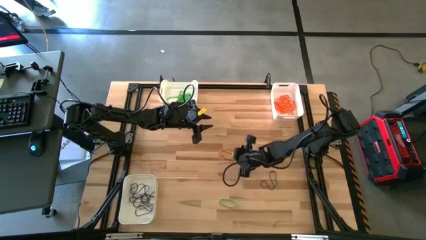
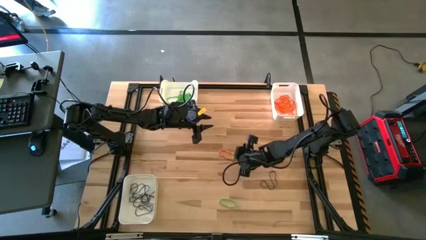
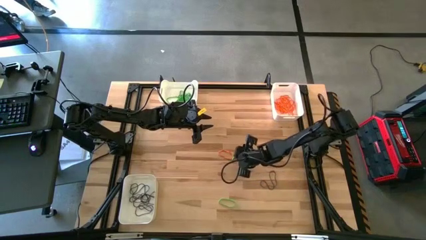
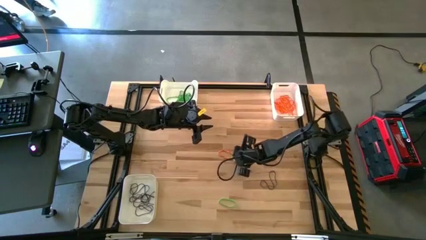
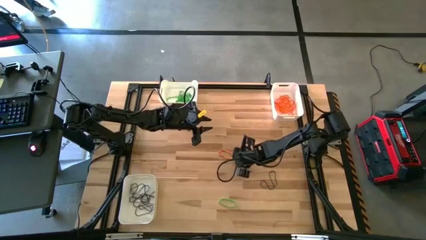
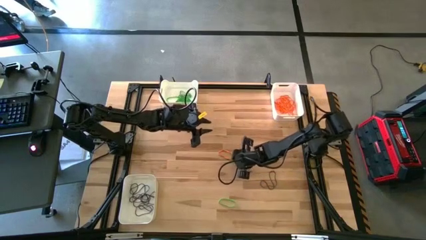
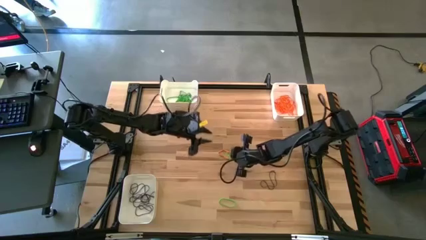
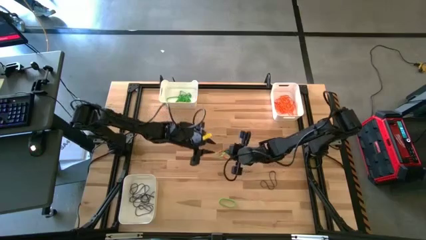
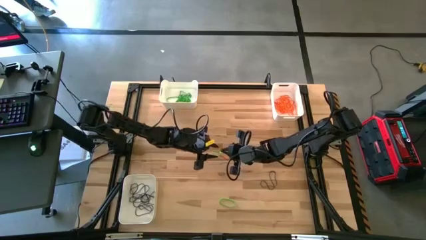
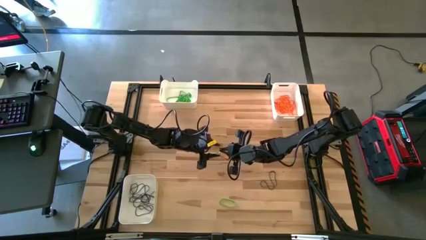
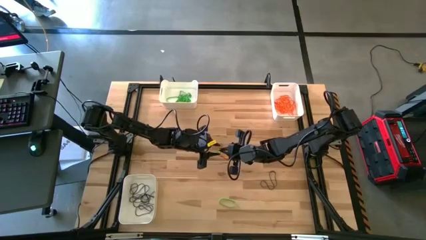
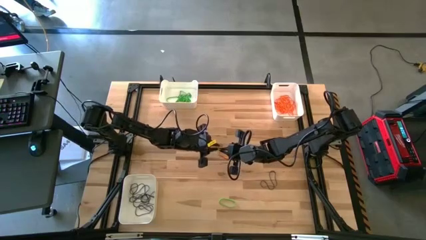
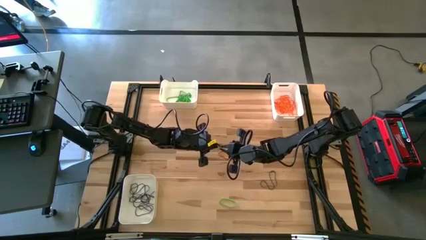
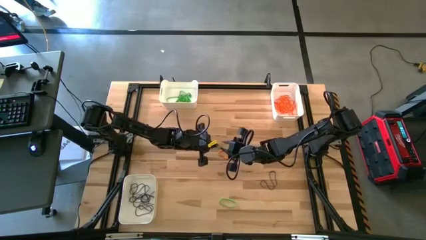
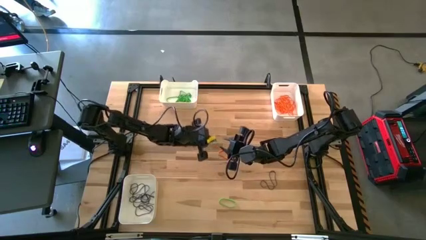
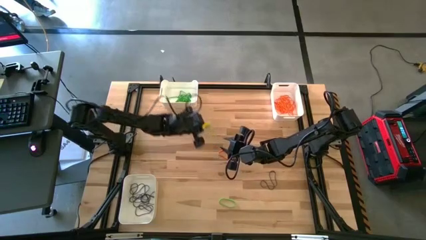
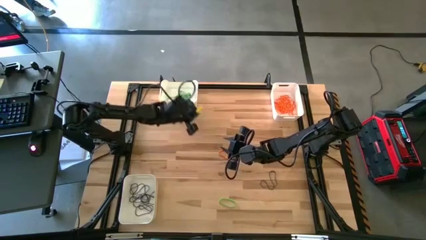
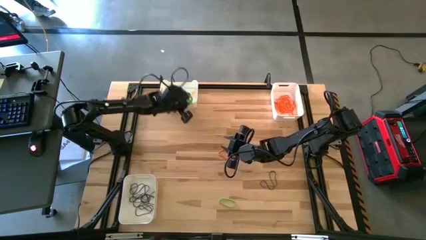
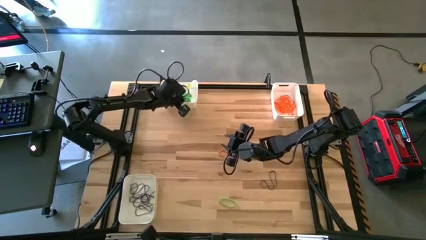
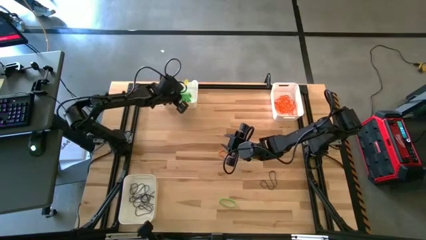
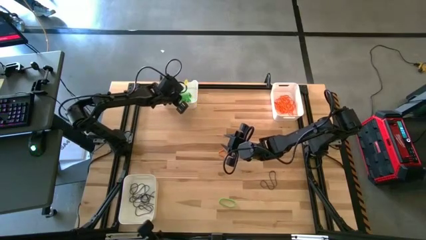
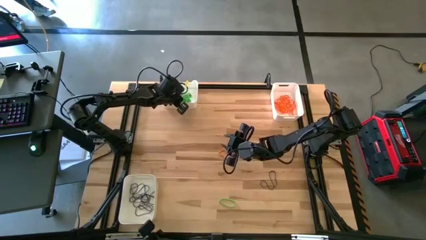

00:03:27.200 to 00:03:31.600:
Task: Sort rubber bands into baskets
Put the green rubber band into the top left white bin

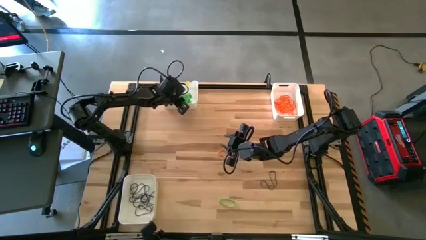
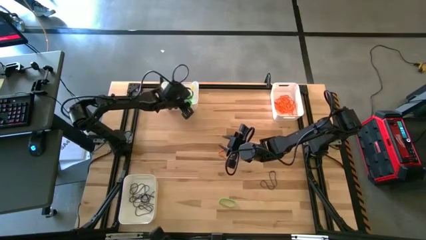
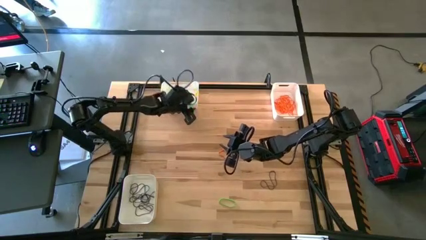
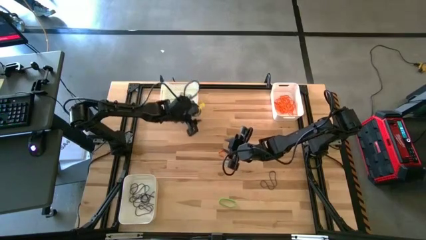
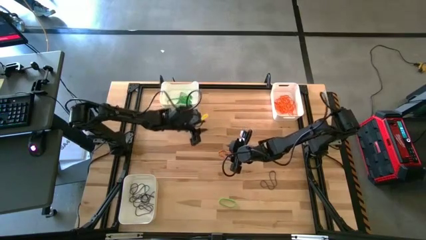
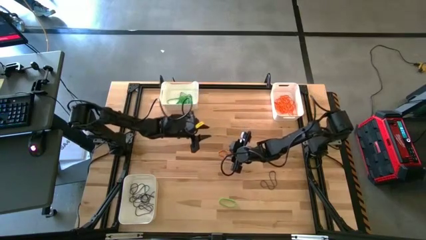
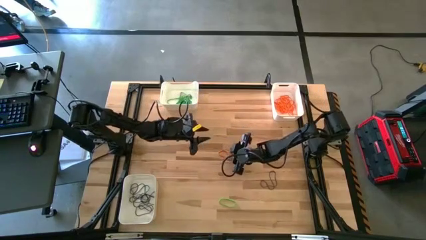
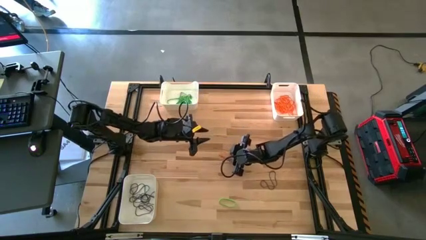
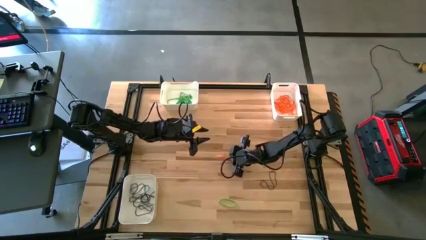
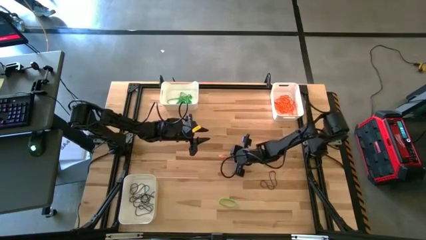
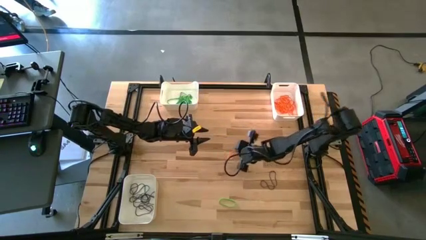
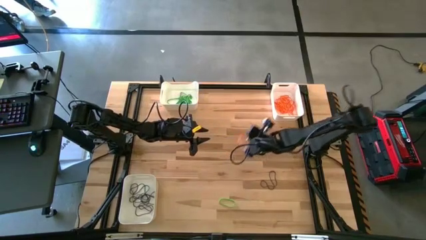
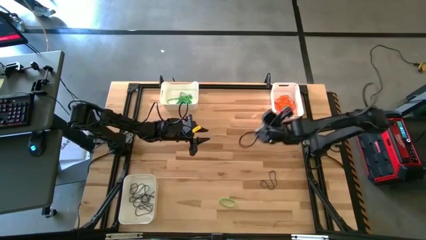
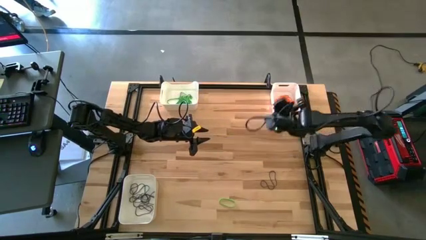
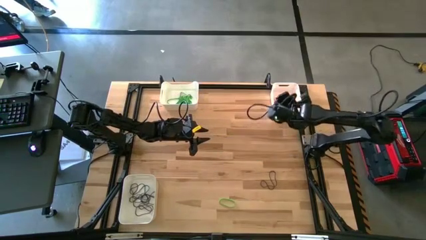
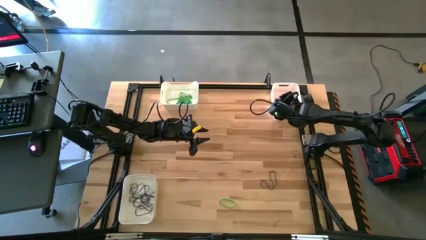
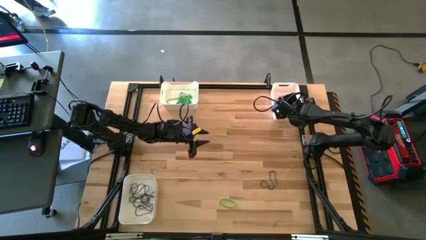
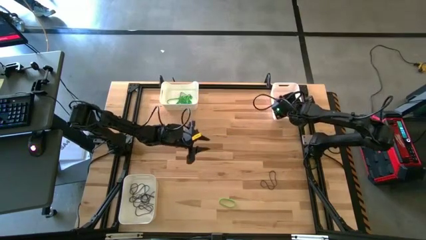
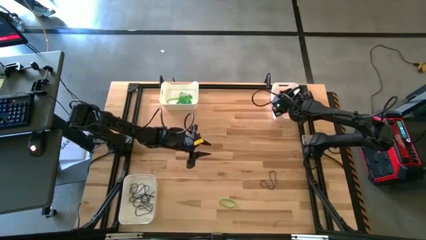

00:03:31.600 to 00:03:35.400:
Put the orange rubber band into the top right white bin

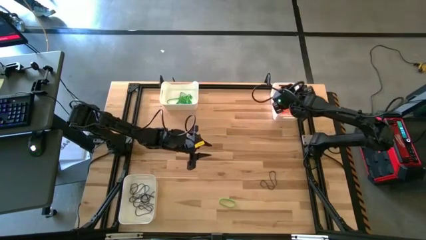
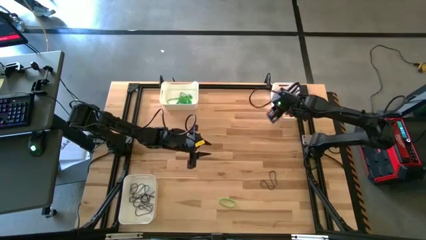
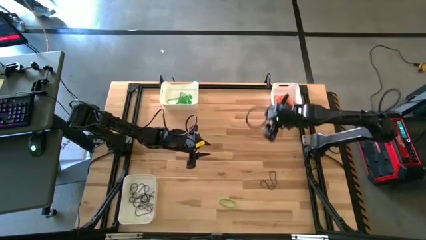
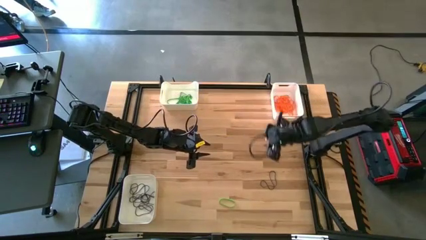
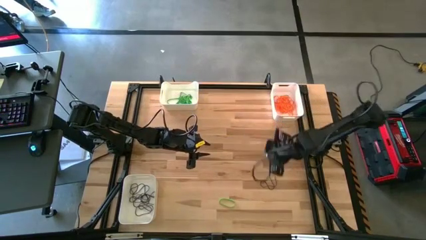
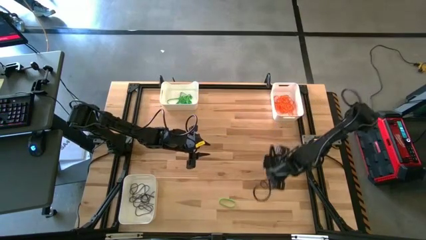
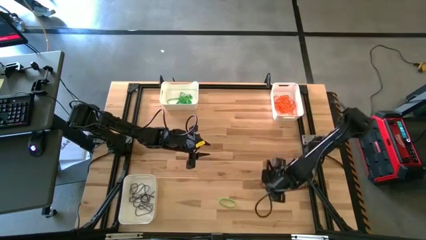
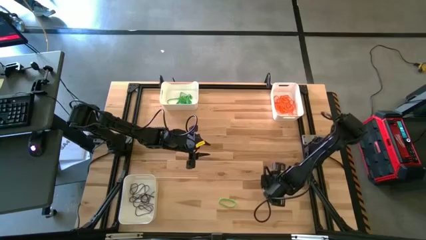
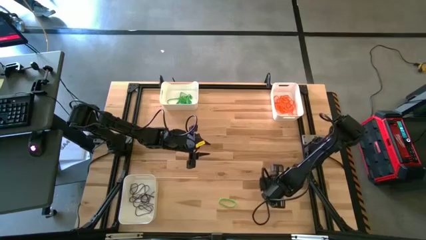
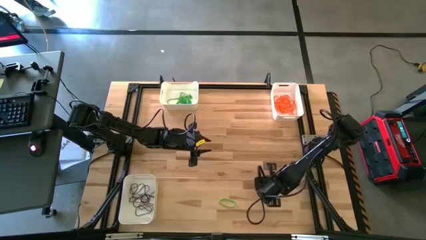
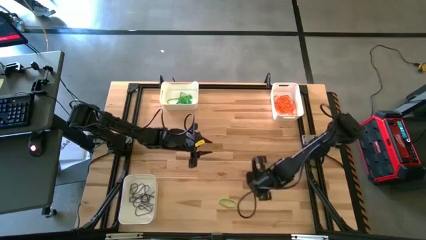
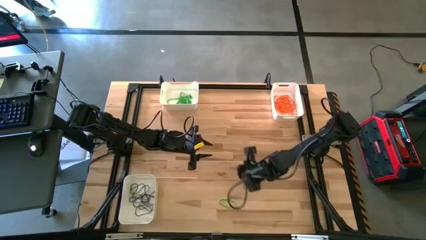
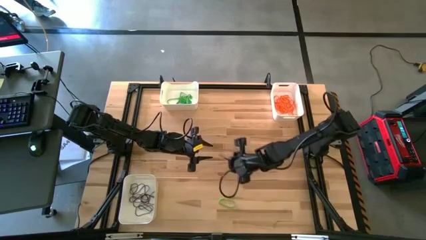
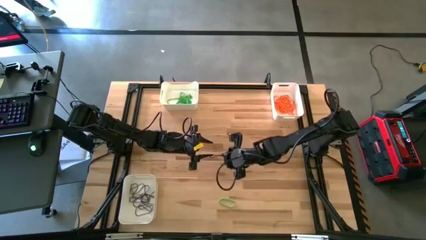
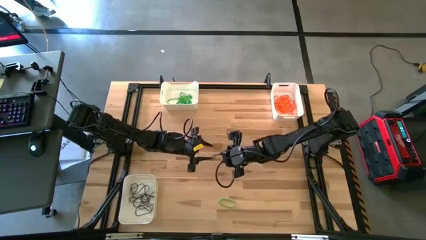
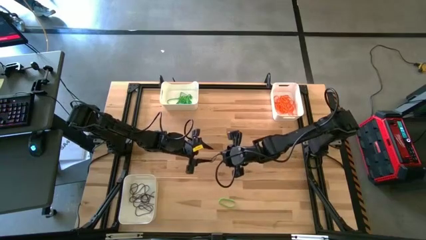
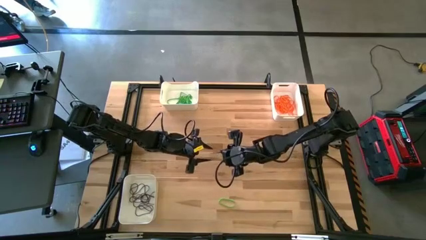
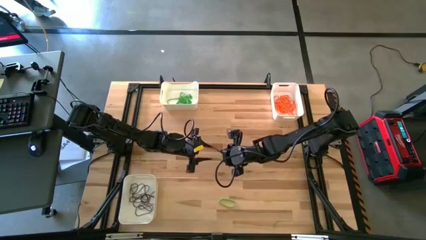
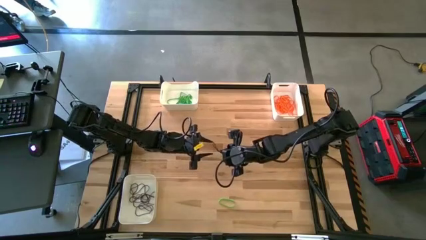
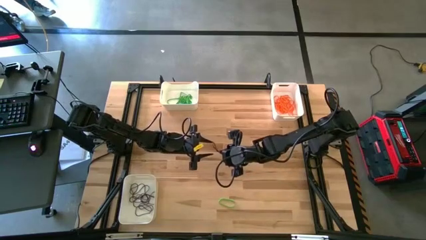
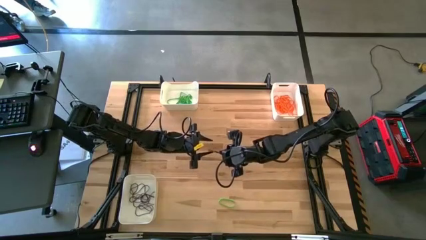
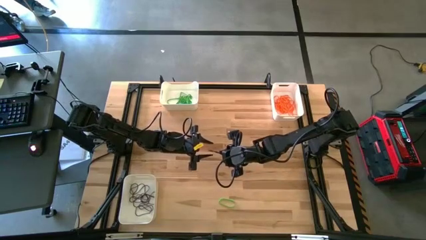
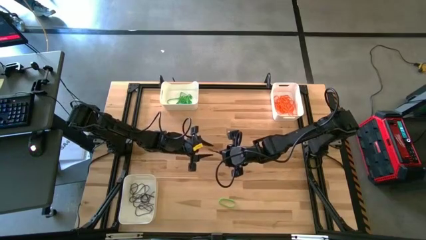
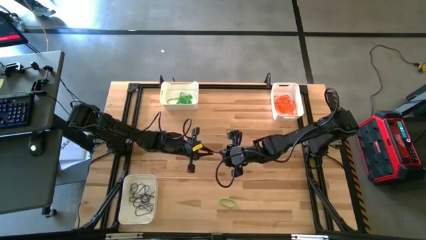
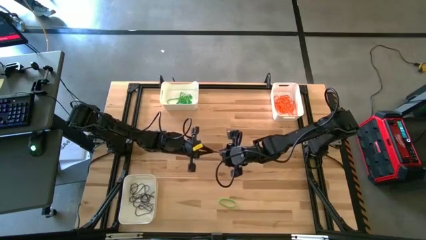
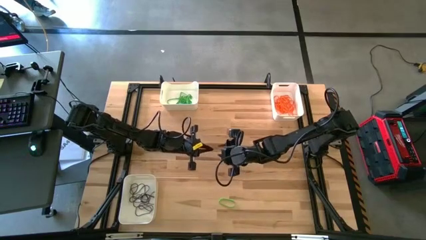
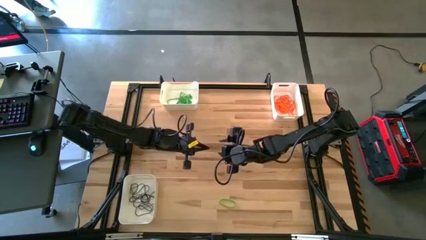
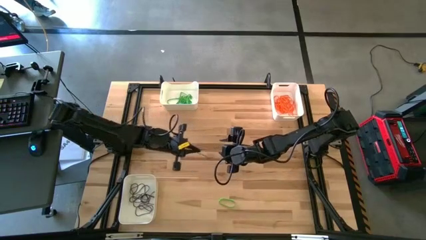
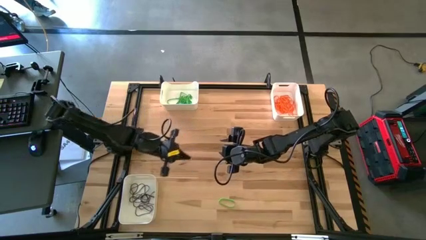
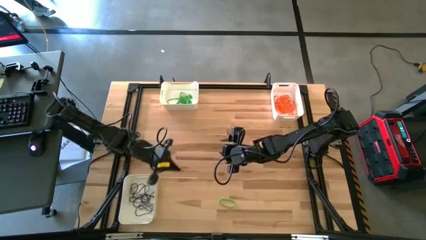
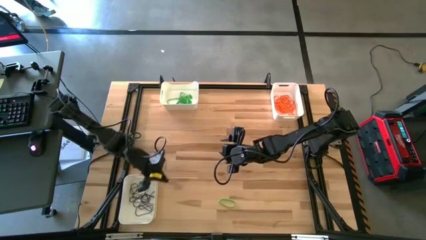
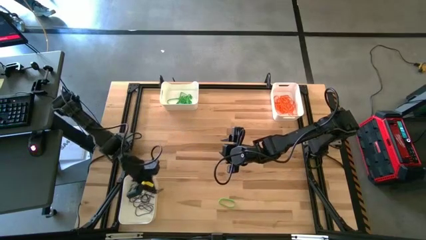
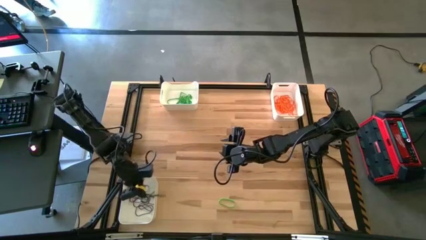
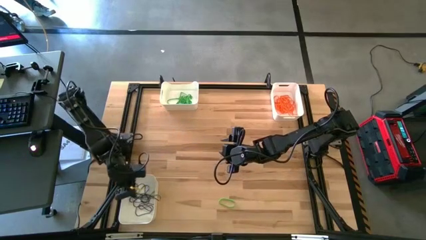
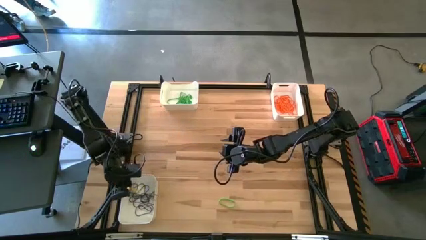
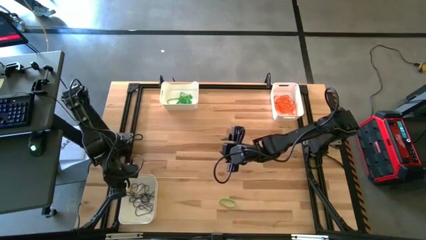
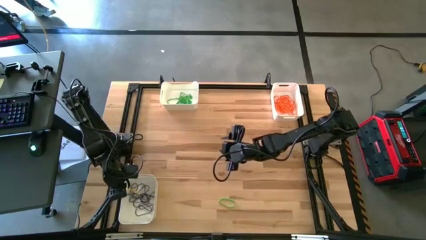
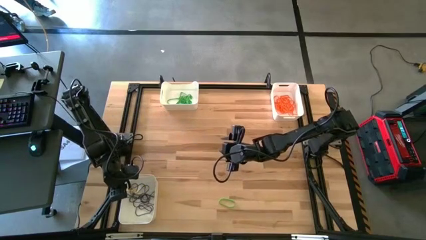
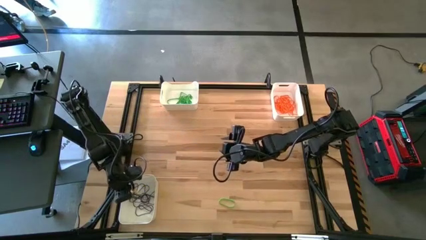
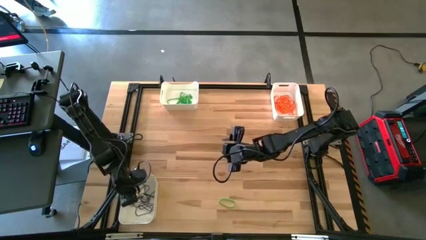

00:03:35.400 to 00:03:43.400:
Put the purple rubber band into the bottom left white bin
